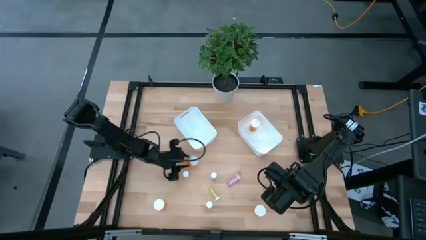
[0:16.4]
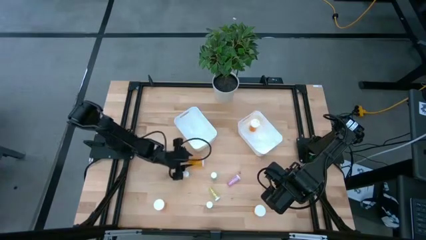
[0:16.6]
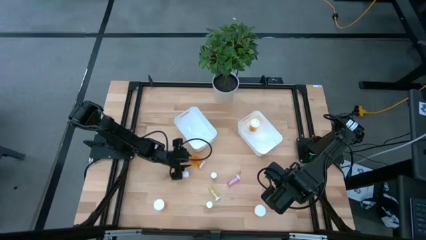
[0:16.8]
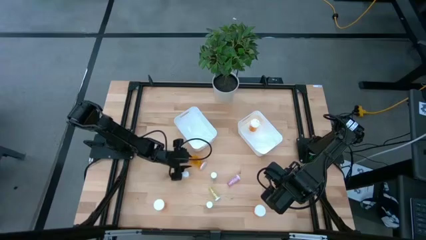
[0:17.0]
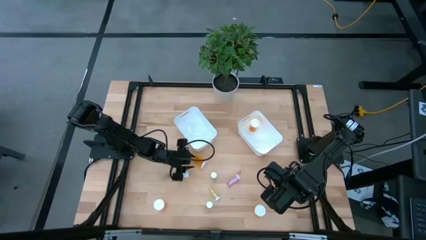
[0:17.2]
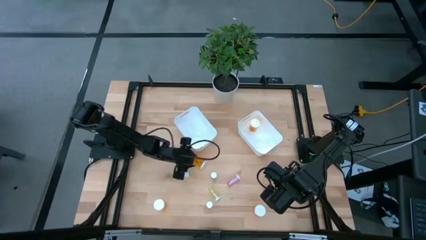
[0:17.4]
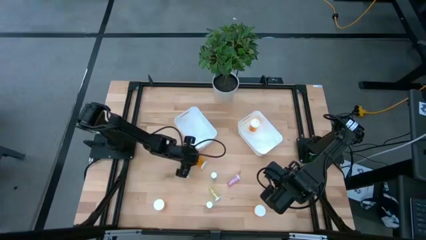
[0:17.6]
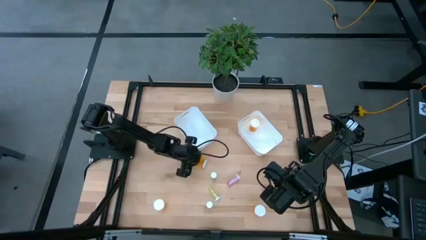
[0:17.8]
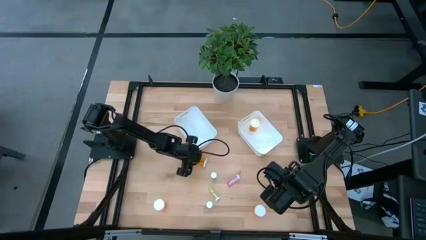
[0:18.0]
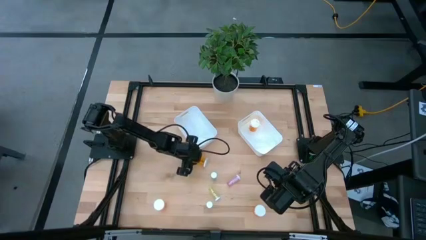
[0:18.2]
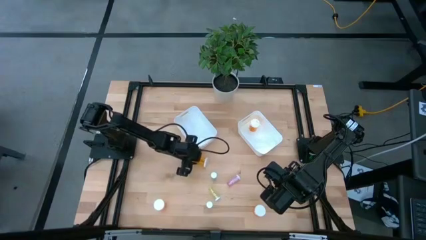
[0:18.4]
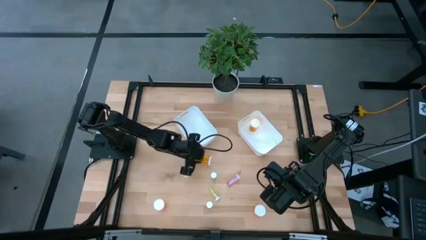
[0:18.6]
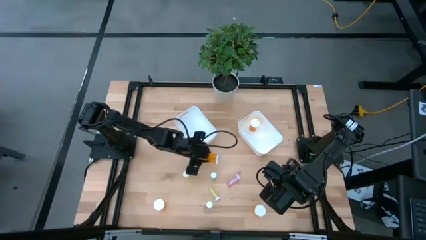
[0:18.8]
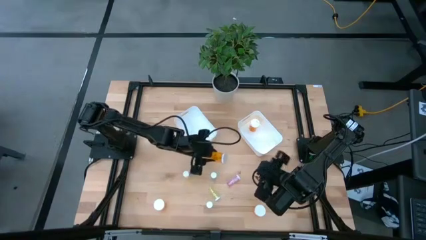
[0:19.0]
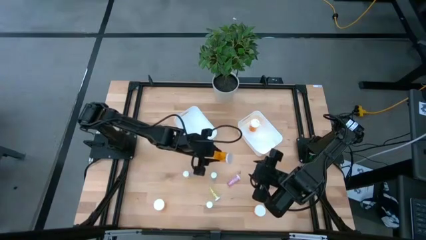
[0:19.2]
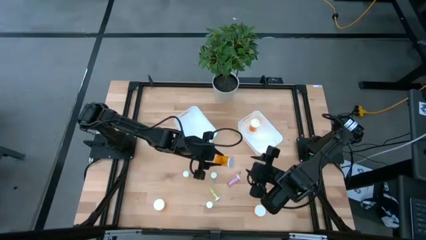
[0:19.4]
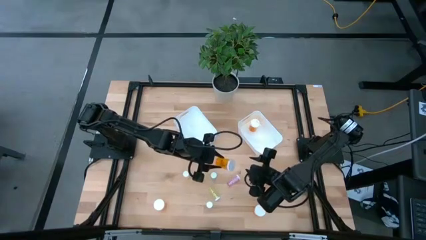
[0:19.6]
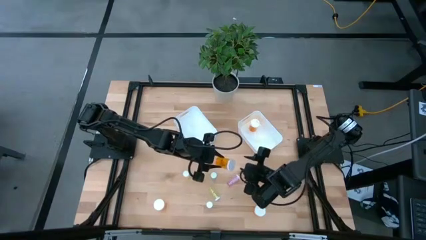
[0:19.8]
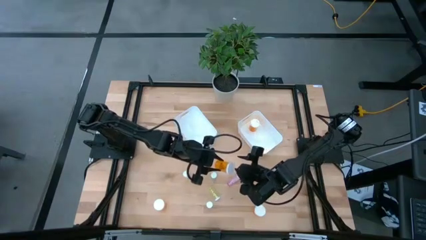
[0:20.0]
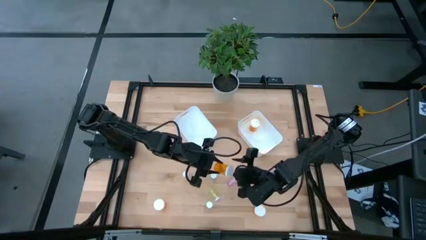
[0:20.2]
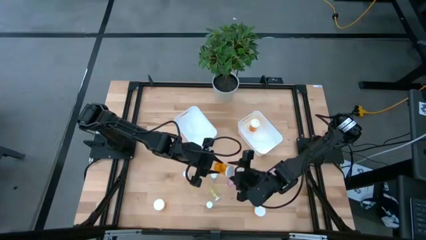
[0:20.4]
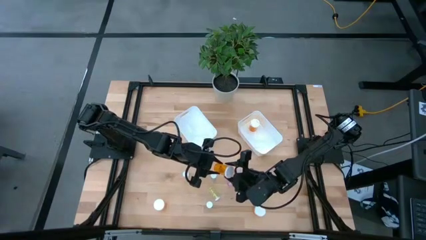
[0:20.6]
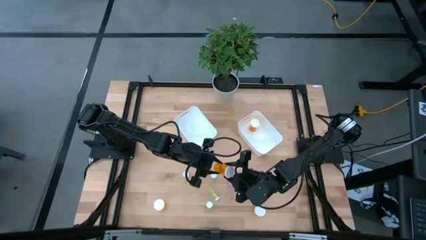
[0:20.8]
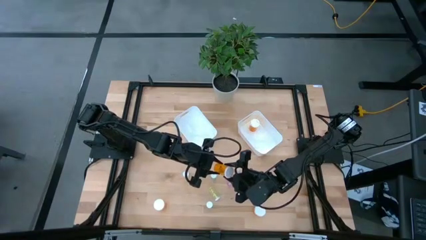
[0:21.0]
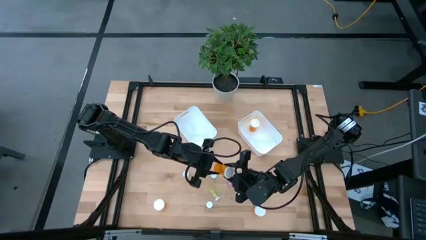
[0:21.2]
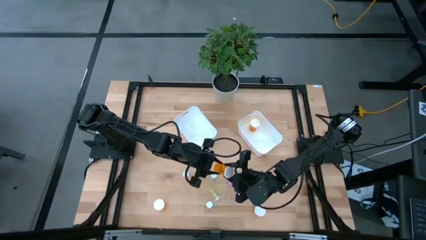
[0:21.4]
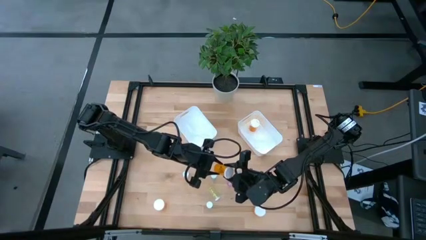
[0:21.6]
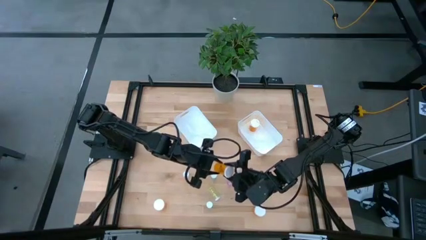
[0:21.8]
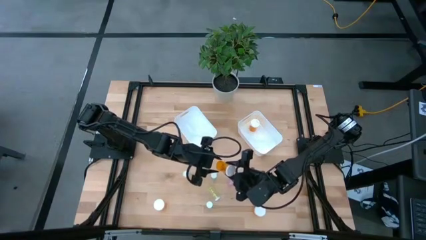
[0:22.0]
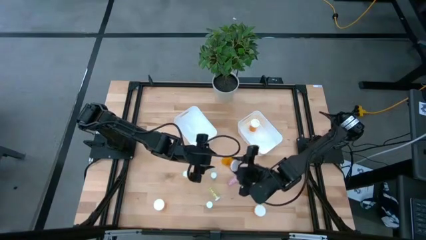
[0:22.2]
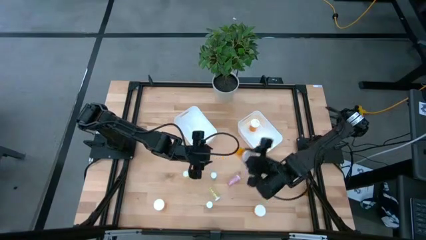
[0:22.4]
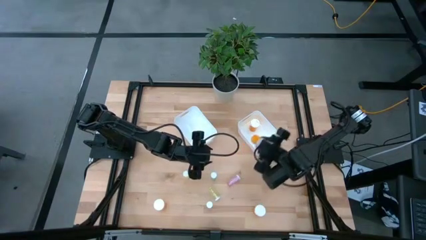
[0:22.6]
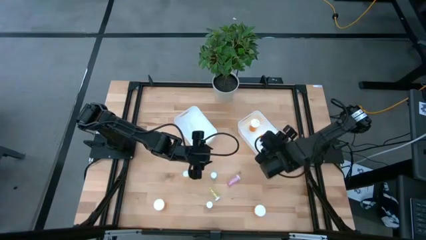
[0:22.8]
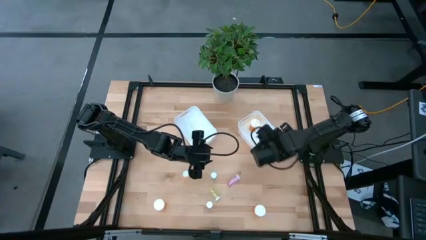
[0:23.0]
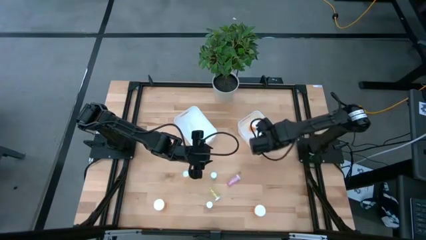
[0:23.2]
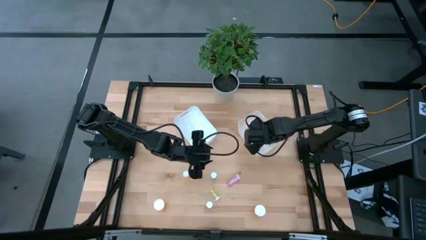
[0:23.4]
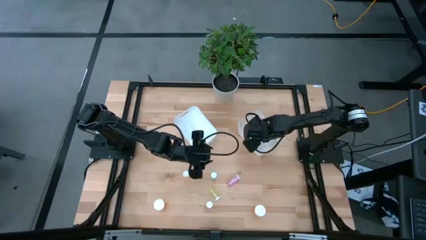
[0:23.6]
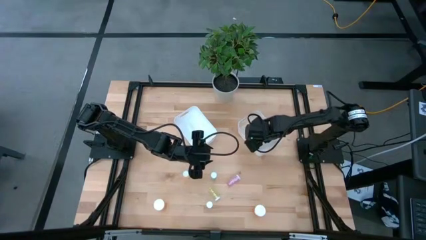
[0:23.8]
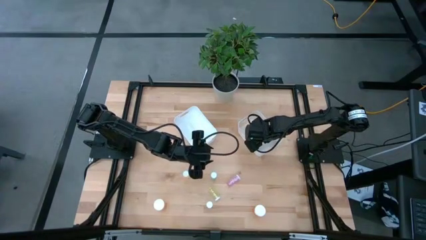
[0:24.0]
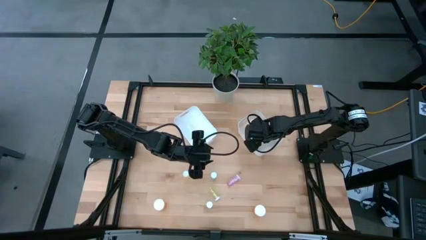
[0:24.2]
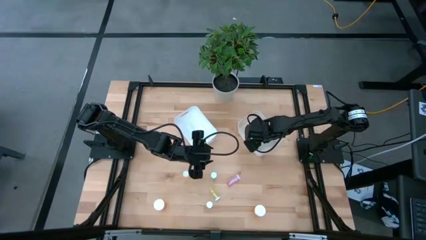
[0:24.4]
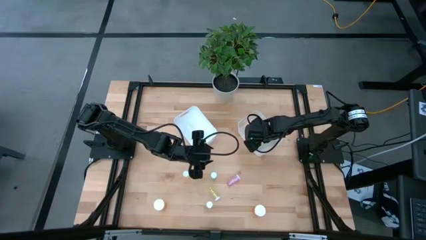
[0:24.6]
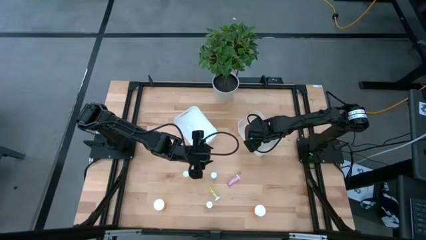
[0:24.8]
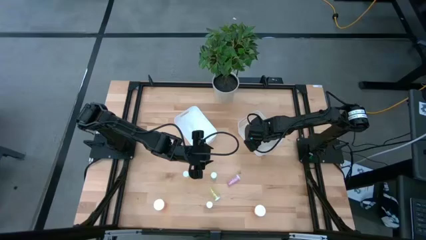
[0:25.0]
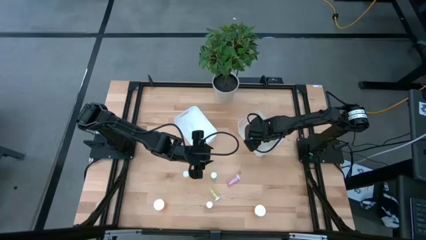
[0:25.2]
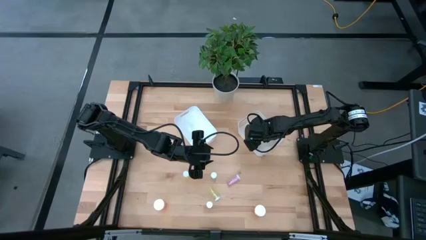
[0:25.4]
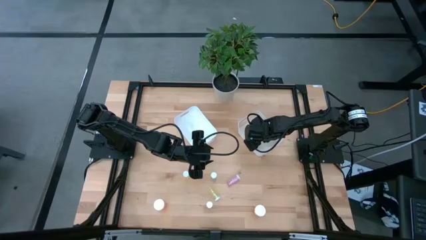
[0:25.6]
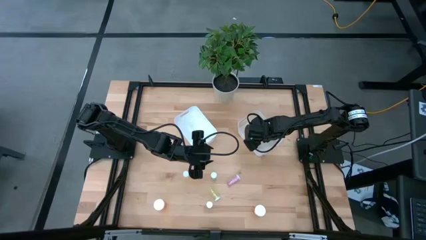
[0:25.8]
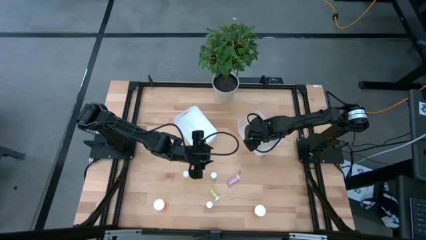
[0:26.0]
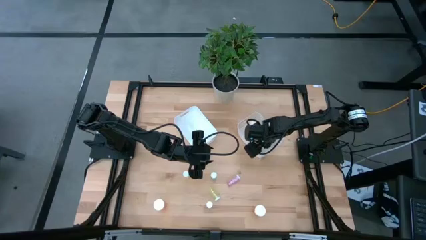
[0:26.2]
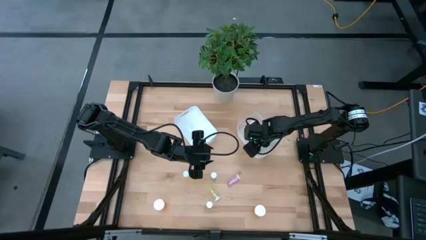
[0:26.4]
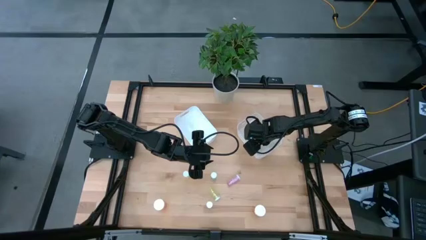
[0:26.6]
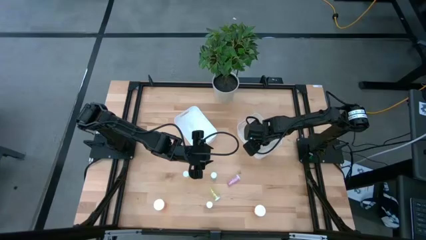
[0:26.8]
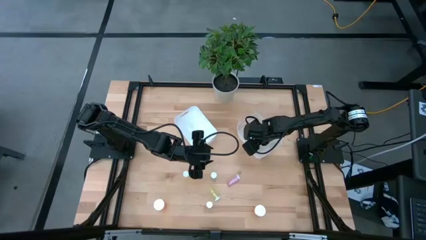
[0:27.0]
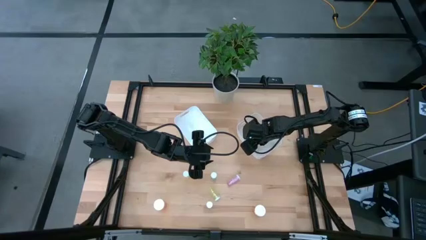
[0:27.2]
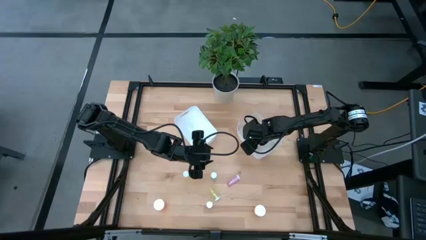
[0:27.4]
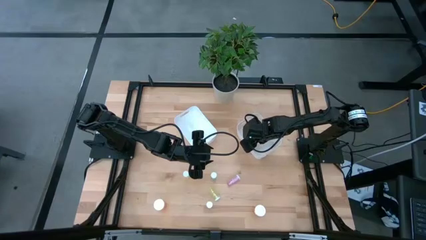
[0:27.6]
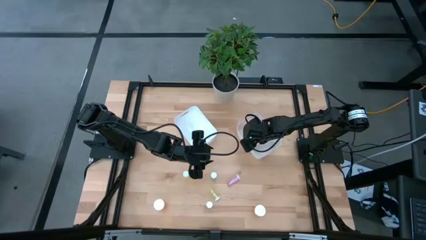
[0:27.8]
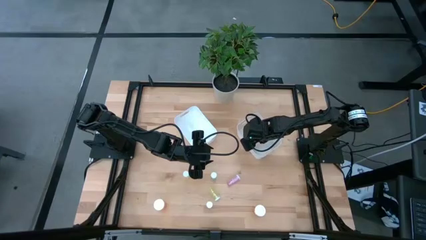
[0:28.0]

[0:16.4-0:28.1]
Task: Pick and place medicine bottles into bin by pill shape (circle, oval)
Put the top left orange pill bottle into the right white bin

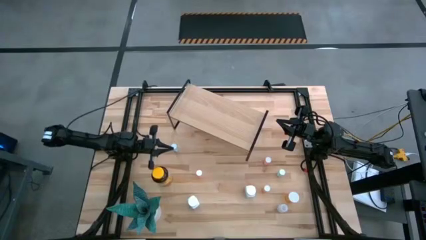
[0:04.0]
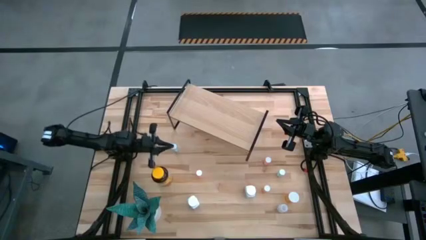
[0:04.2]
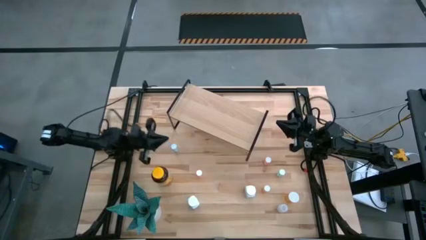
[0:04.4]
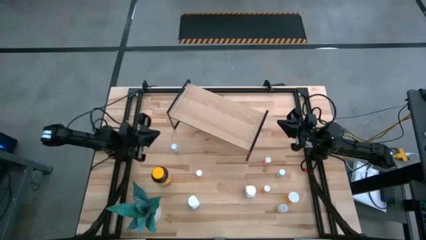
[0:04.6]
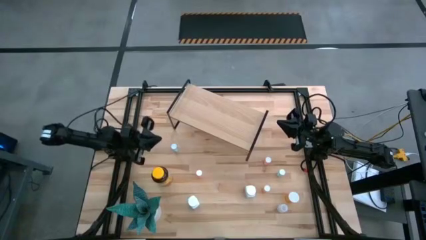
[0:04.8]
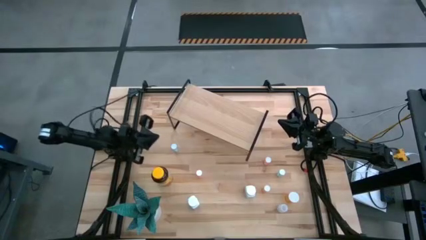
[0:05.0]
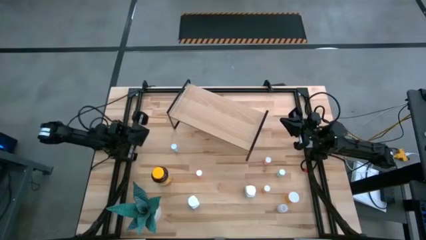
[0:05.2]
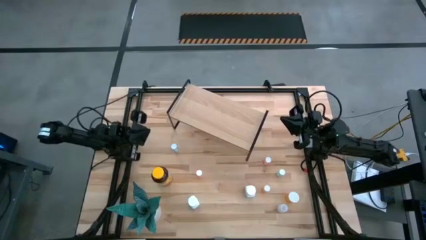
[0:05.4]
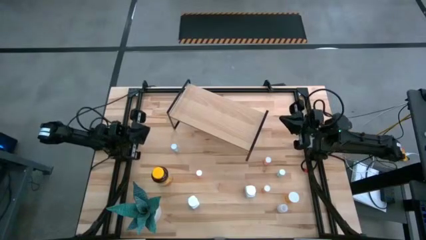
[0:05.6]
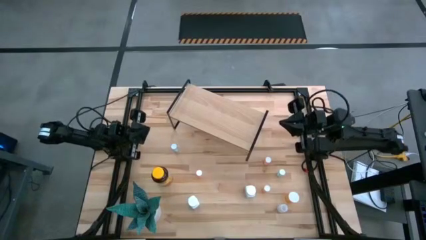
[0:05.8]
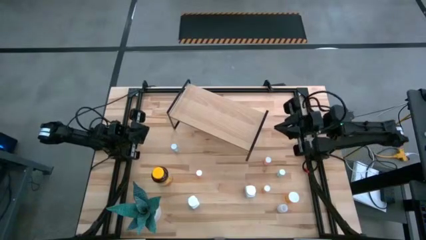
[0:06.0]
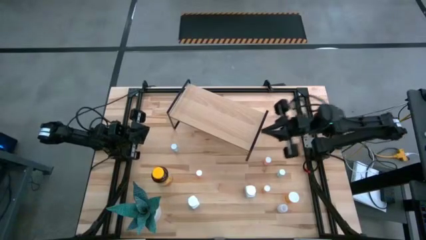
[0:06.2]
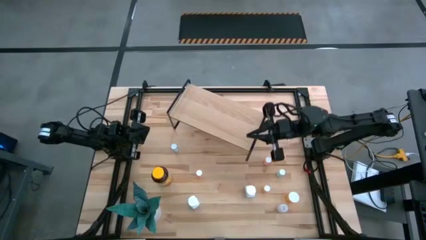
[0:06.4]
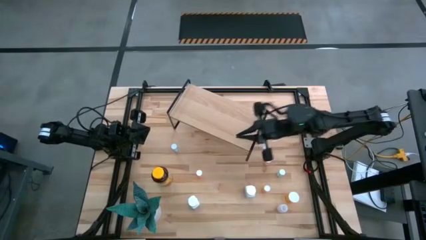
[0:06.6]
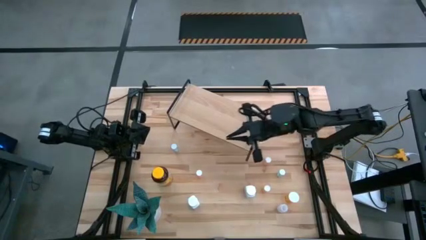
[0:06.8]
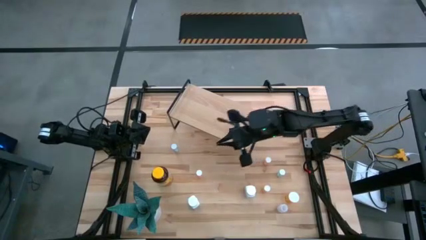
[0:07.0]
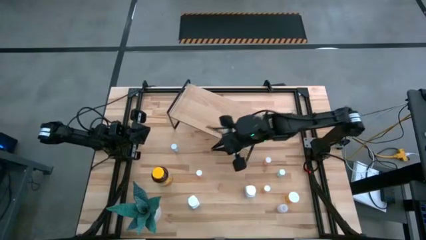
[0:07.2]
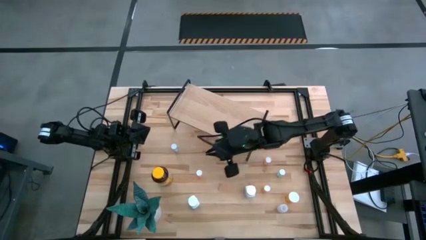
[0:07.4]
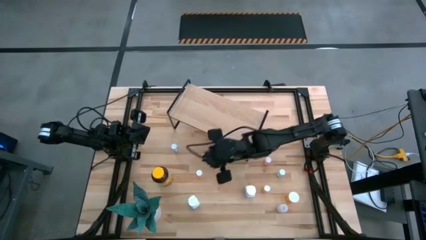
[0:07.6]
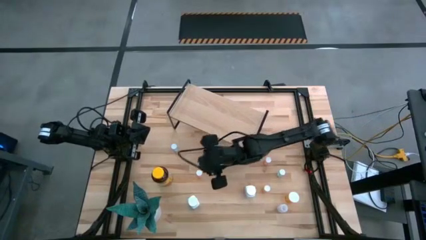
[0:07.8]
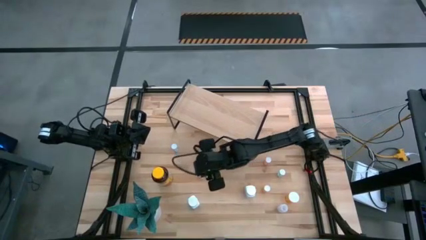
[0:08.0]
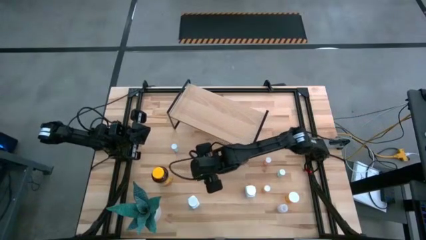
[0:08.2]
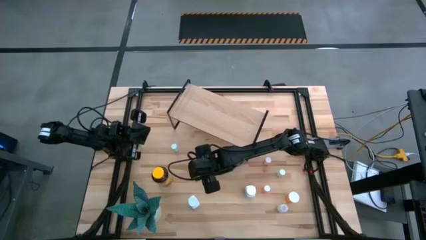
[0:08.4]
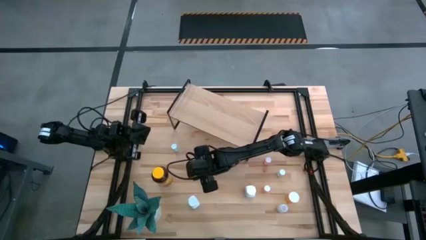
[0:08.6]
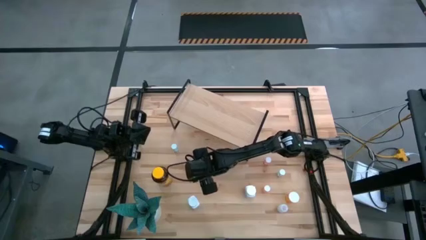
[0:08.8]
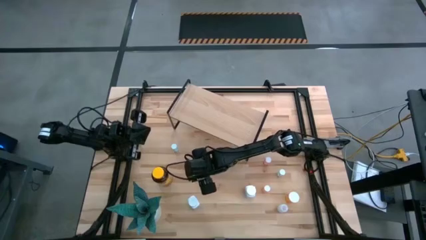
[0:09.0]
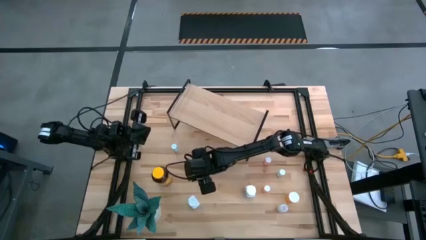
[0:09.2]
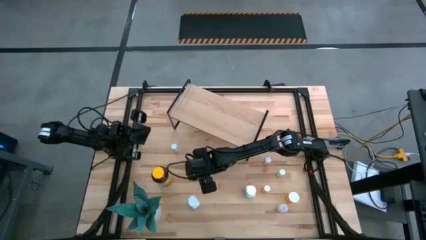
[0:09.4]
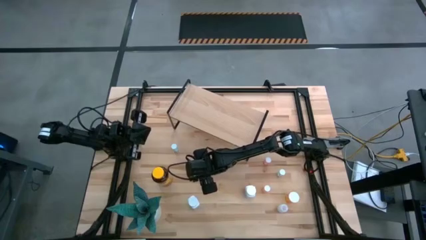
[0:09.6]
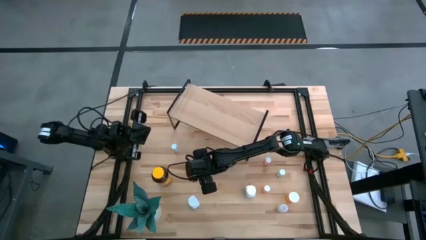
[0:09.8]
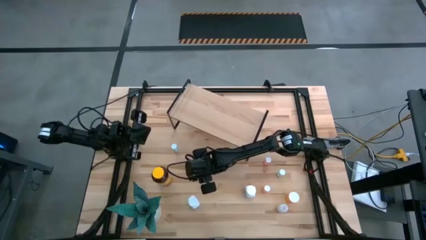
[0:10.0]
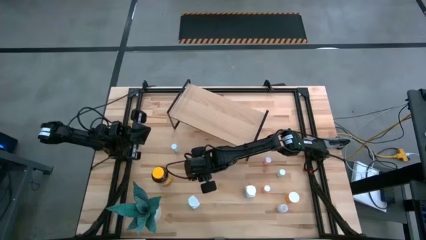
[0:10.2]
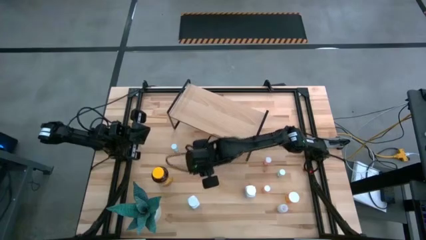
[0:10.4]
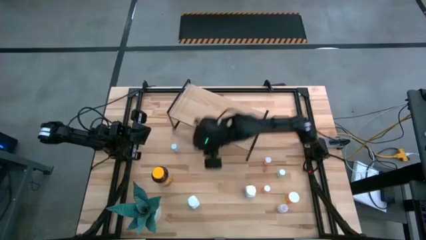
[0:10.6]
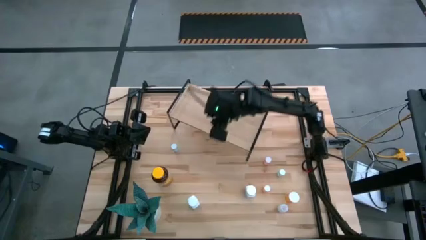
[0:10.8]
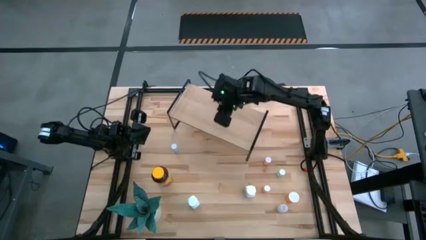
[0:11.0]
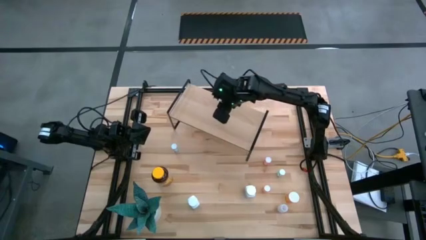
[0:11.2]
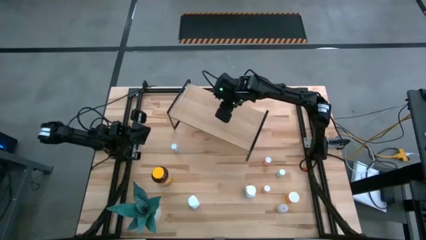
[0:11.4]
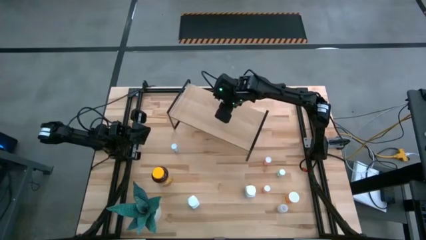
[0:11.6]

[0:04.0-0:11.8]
Task: Pick and place medicine bottles onto shelf by color
Put the left red pill bottle on the shelf
